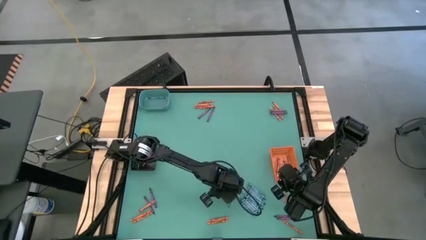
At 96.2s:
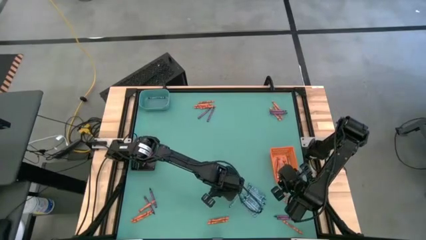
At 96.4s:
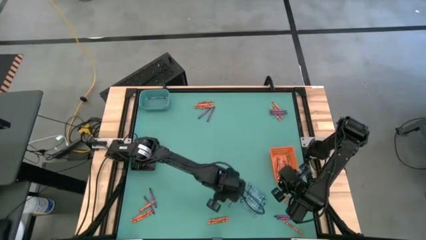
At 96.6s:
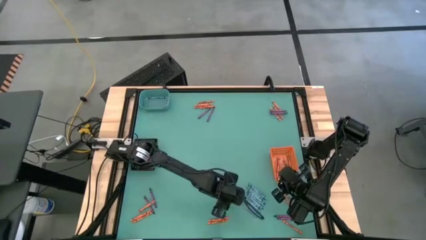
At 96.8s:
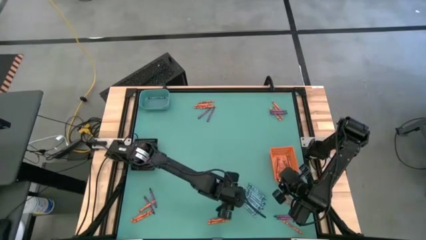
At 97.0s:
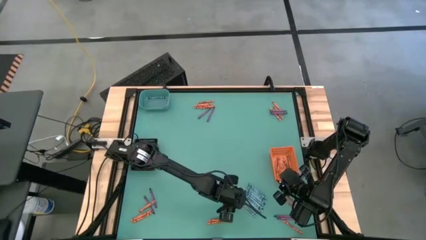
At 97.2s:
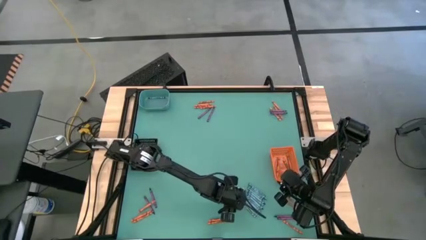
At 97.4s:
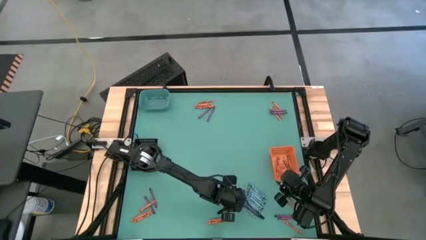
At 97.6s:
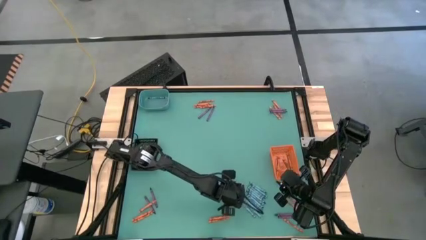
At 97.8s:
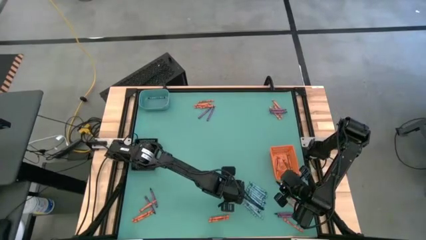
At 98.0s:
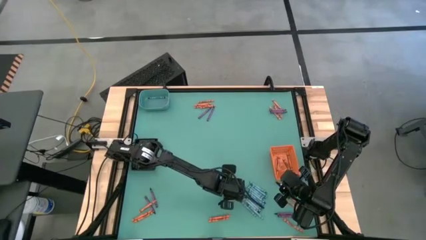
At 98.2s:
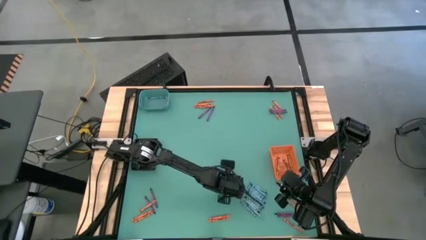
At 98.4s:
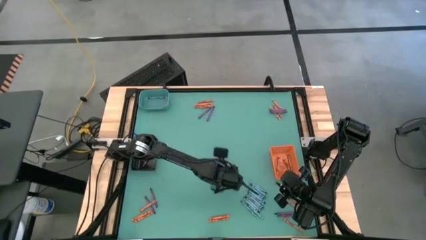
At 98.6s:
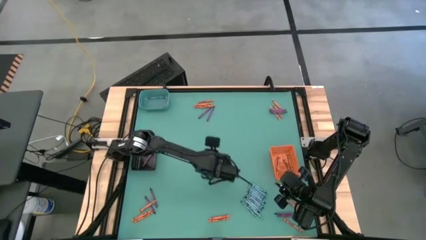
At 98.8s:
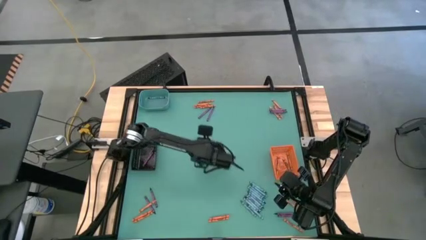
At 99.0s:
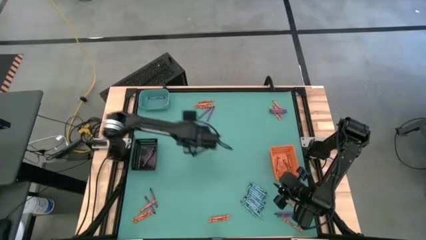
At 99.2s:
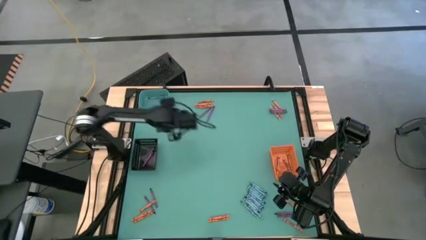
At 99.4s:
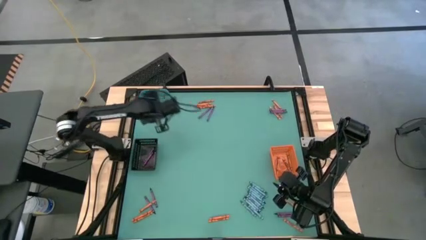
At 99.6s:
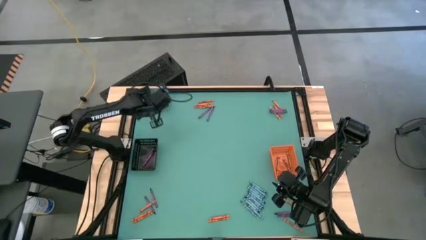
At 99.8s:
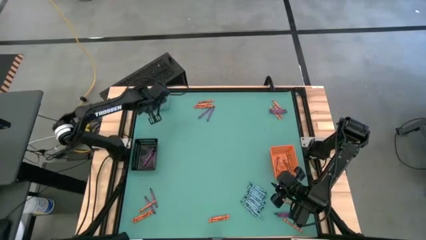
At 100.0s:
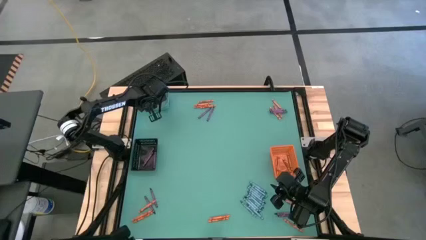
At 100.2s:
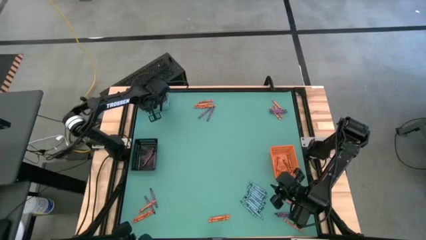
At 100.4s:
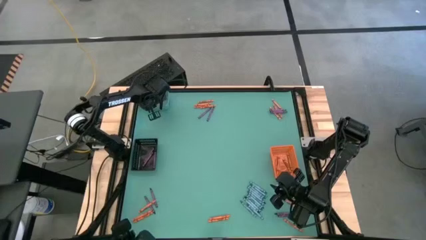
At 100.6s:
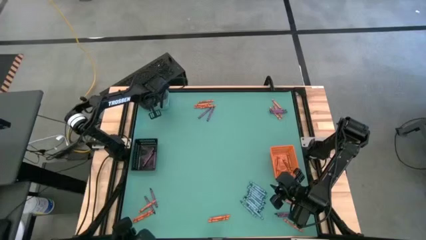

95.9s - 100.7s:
Task: Sort crayons
Put the blue crayon into the green bin

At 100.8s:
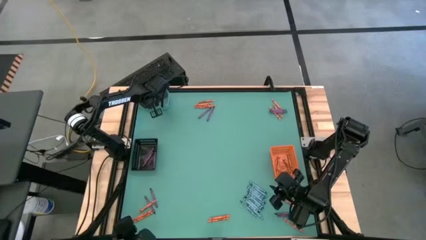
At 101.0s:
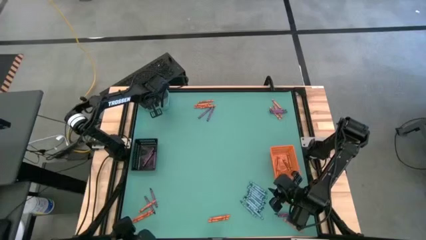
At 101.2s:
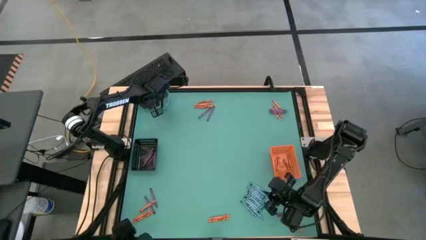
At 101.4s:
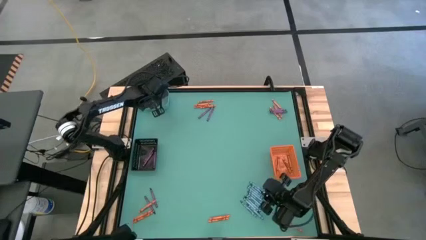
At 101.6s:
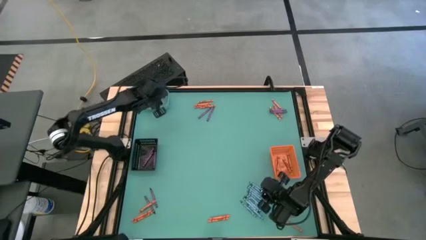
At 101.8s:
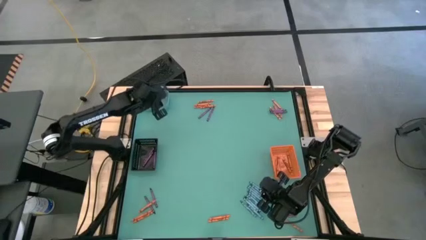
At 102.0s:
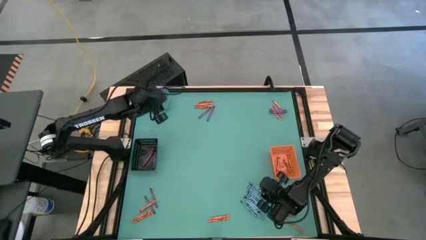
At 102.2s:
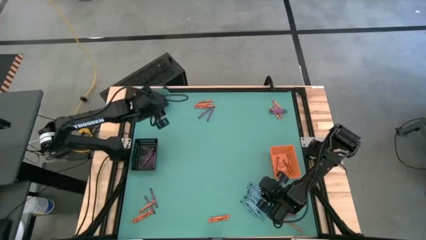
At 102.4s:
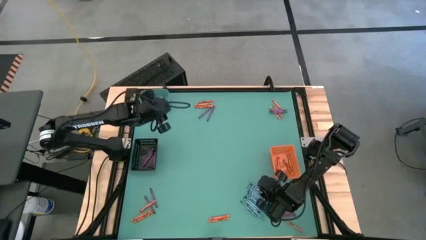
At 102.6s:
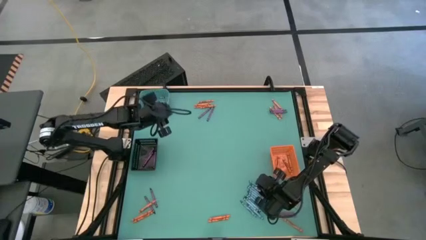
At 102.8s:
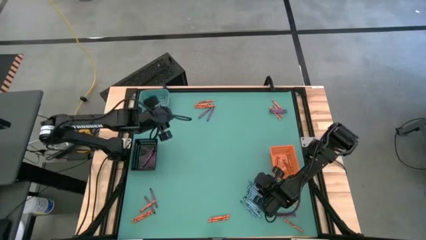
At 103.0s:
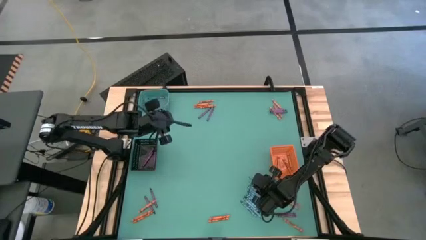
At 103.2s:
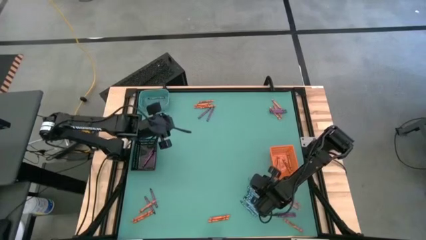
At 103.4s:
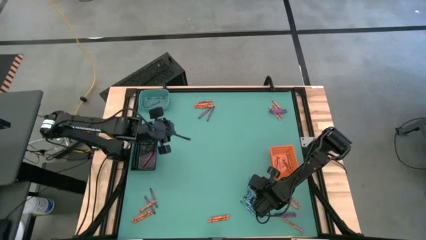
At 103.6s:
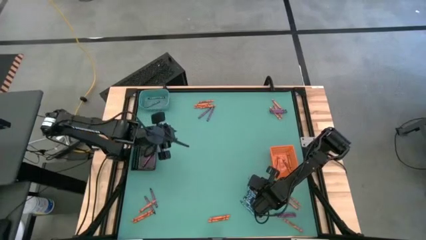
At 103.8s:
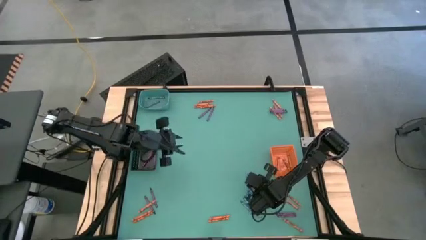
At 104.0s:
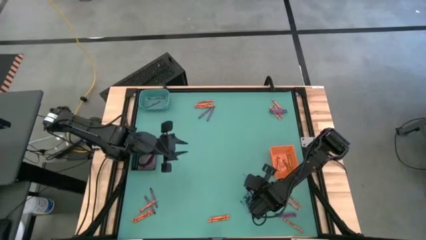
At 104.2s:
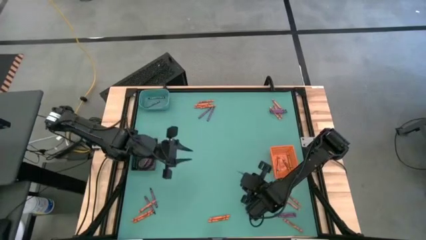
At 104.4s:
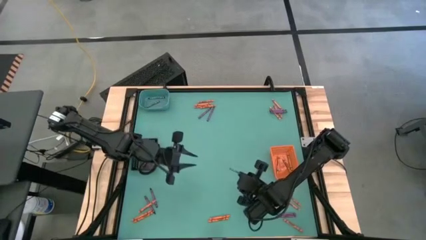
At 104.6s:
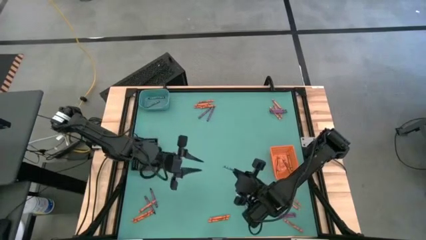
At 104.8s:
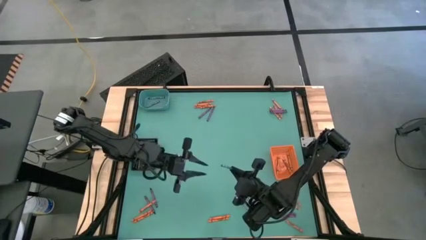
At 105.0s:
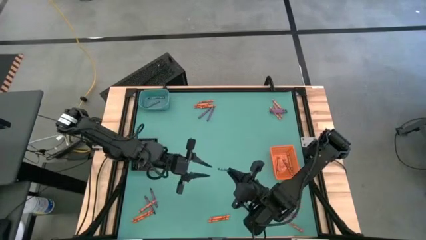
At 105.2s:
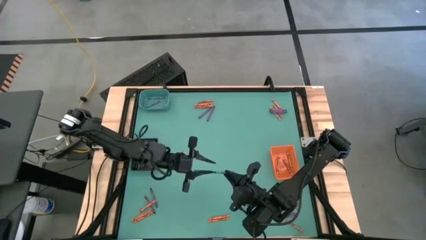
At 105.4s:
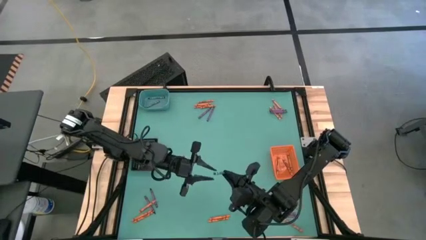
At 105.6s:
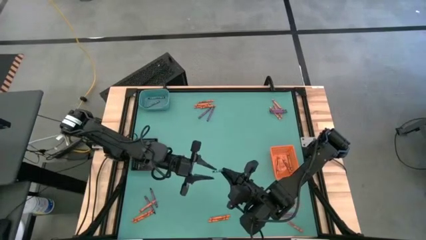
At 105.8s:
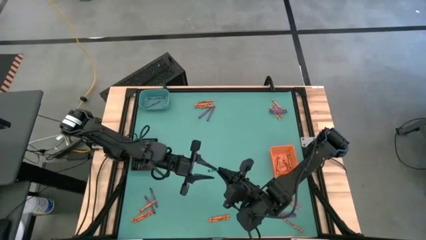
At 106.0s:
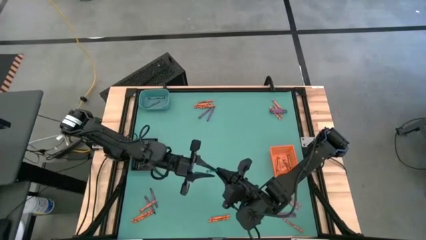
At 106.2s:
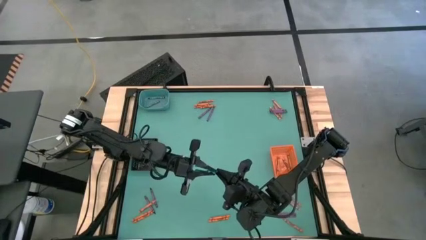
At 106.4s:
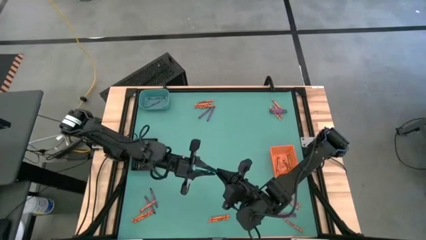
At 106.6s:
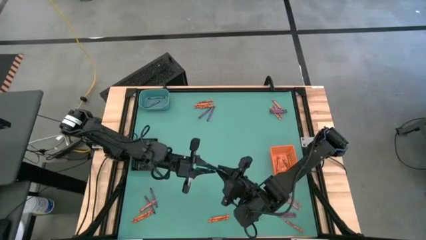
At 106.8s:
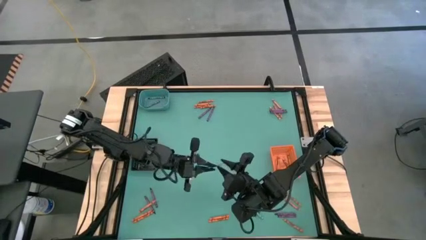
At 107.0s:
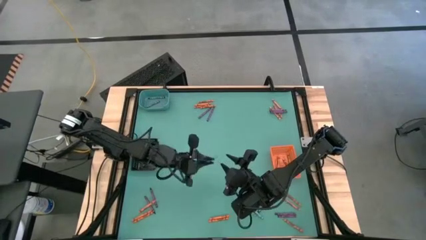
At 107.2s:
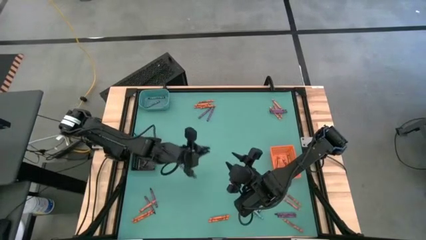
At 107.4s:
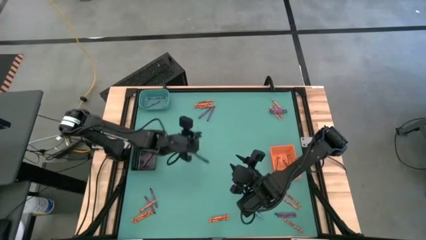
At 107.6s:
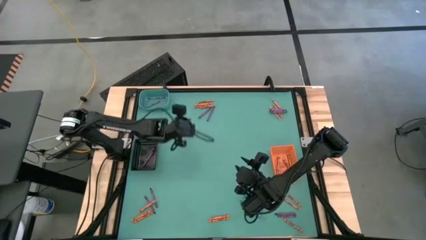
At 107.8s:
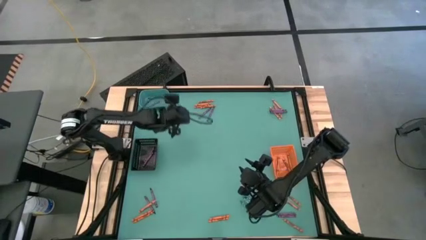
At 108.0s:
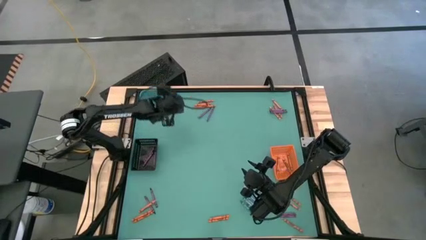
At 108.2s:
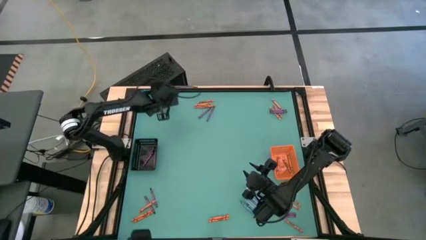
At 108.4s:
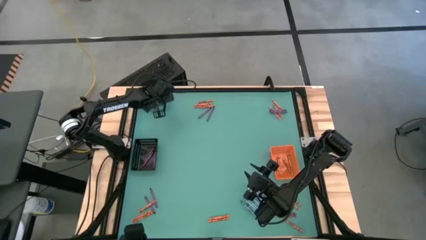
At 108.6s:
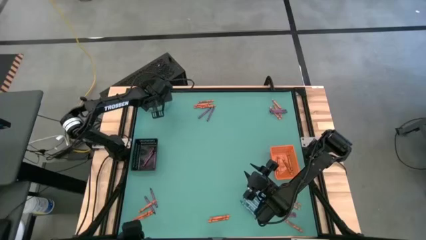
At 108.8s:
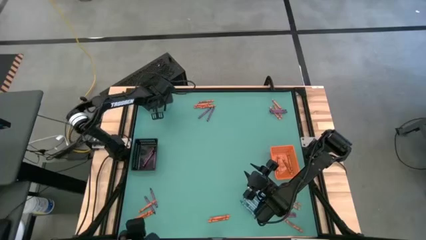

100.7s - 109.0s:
Put the green crayon into the green bin

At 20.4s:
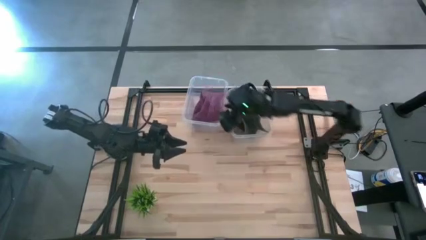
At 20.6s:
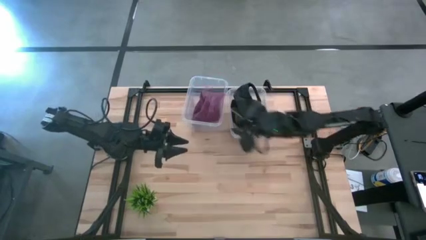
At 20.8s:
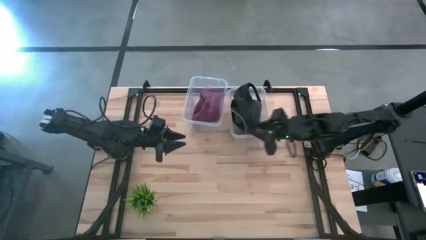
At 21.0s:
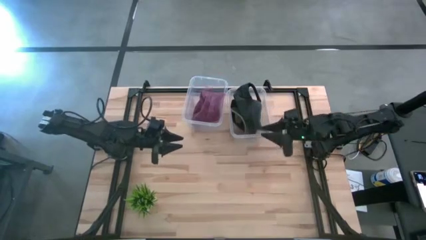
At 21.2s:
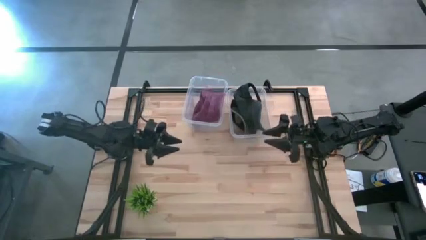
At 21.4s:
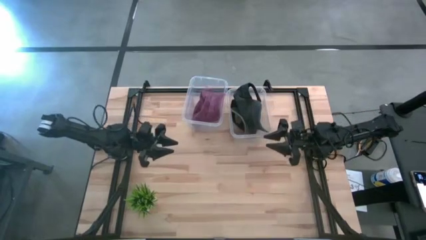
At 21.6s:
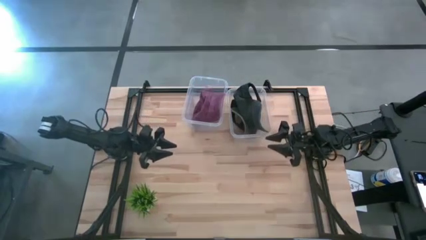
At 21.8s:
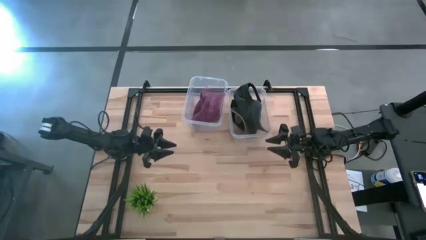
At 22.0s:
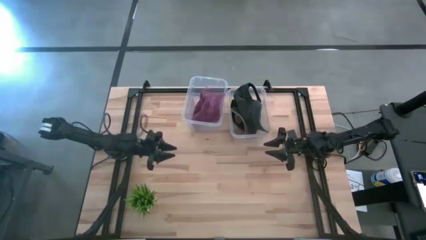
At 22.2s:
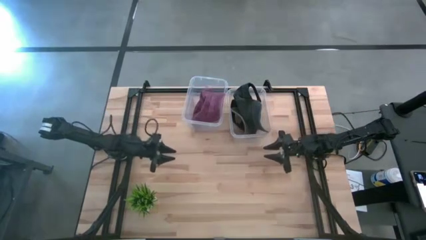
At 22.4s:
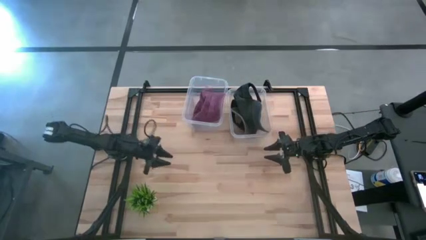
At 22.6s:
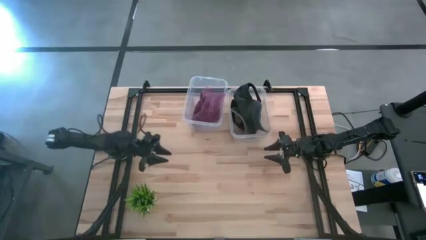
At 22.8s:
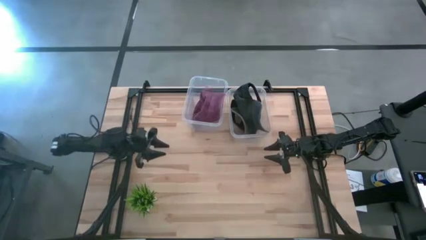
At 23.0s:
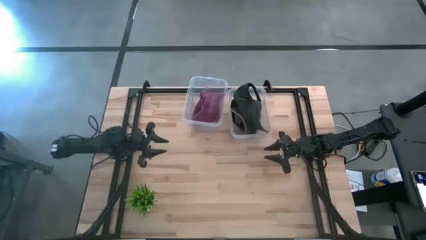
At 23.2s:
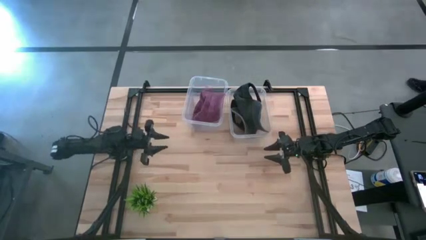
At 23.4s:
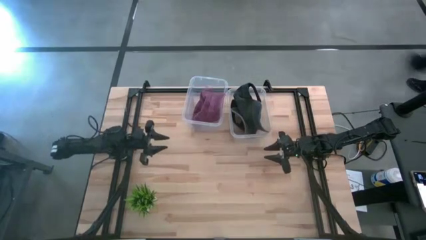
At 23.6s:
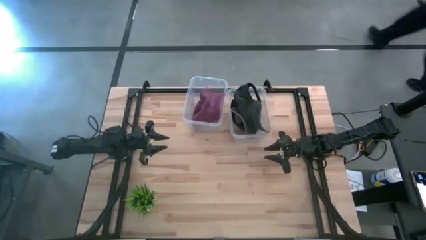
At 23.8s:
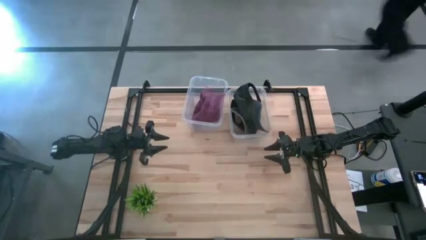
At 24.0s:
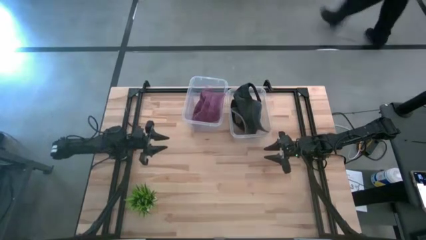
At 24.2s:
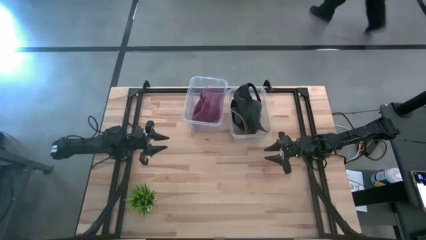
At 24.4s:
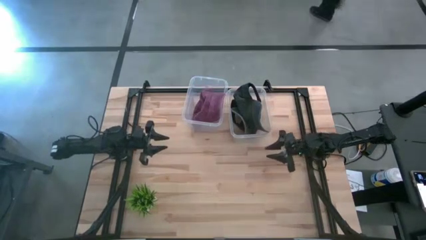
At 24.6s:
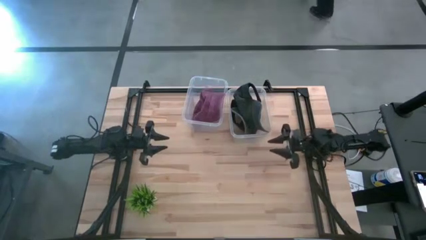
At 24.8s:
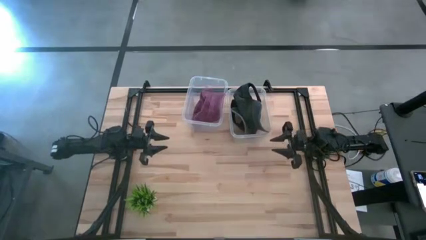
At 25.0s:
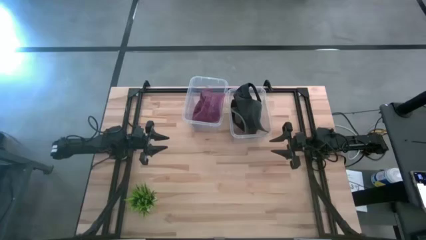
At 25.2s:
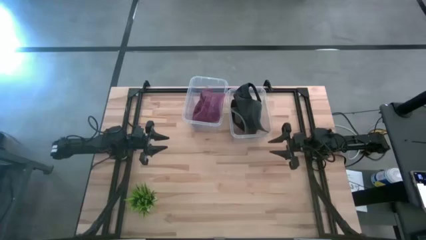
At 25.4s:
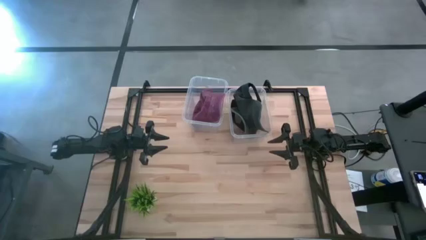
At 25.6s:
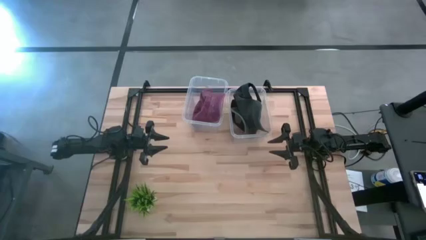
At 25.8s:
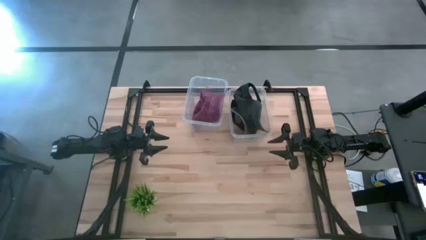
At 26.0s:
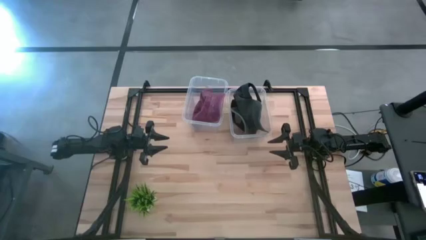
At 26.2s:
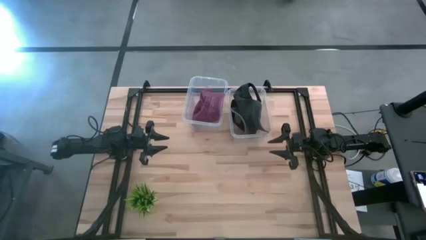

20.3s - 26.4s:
Task: Pick & Place hat
Return to Home Position
